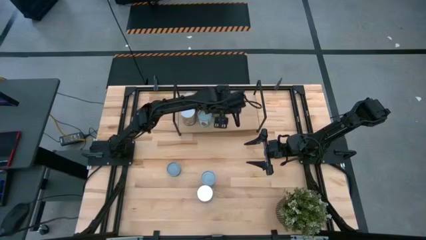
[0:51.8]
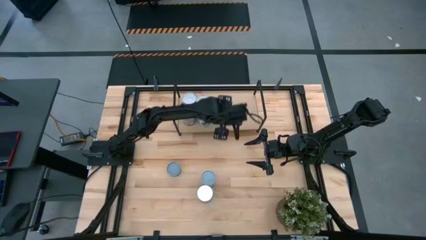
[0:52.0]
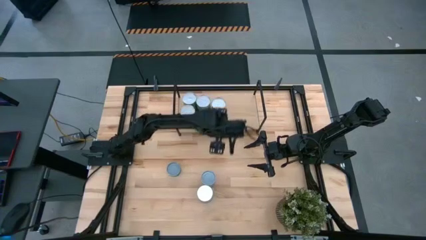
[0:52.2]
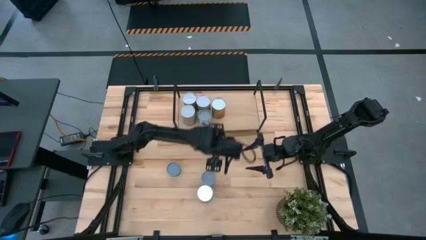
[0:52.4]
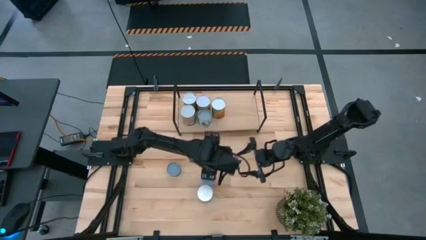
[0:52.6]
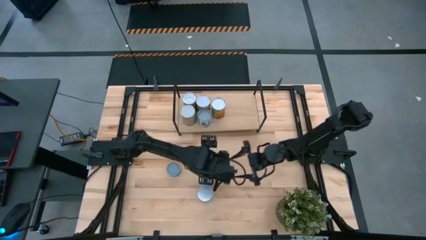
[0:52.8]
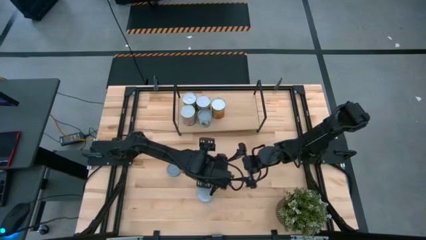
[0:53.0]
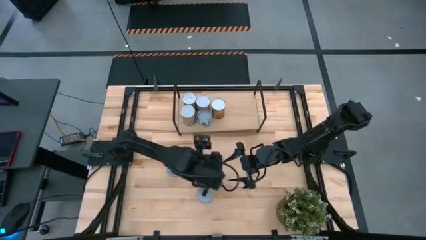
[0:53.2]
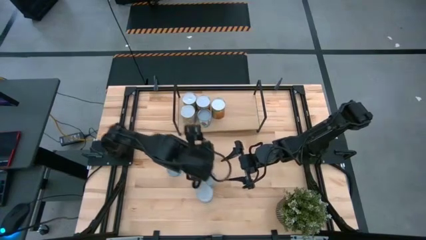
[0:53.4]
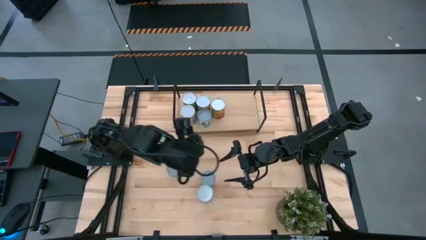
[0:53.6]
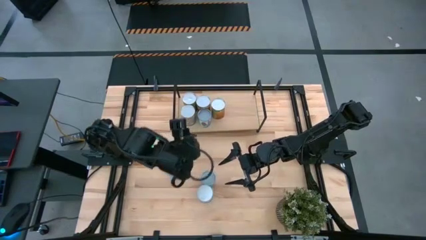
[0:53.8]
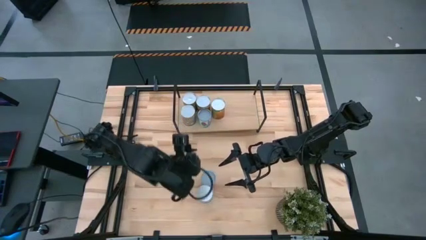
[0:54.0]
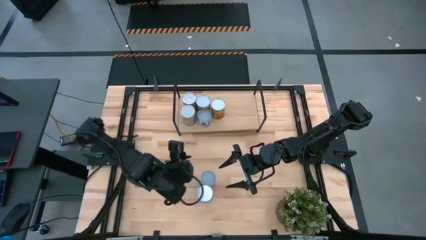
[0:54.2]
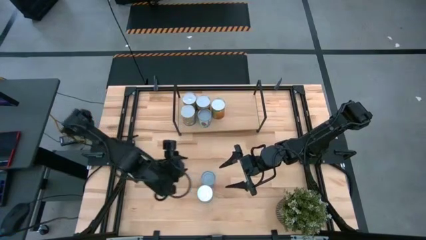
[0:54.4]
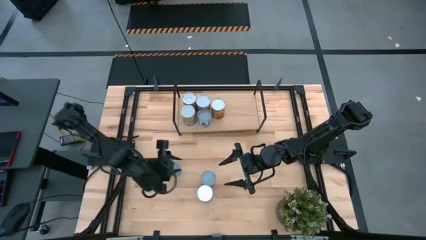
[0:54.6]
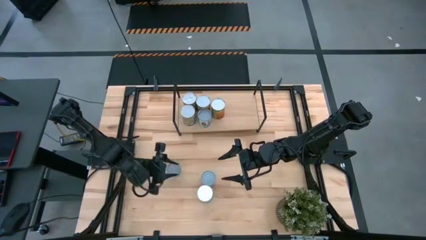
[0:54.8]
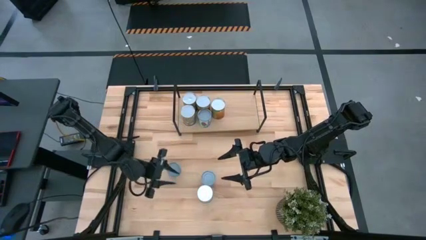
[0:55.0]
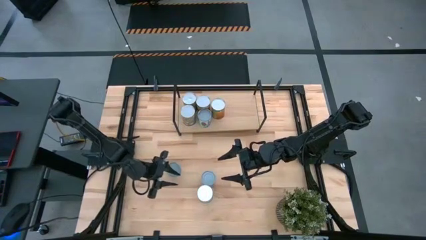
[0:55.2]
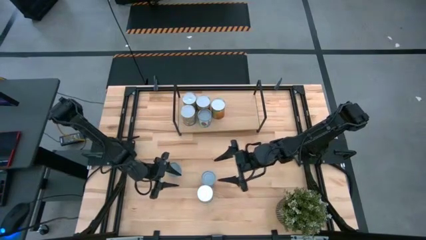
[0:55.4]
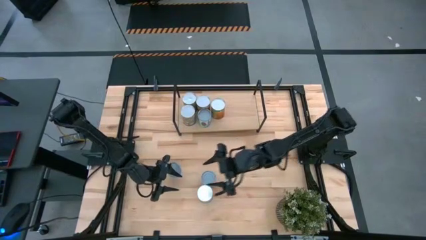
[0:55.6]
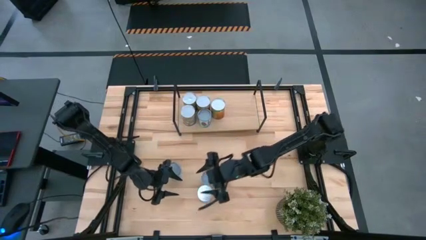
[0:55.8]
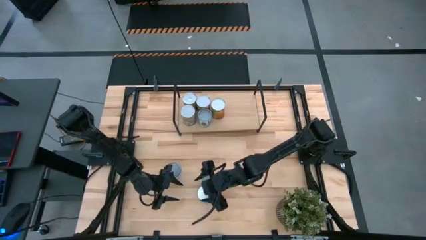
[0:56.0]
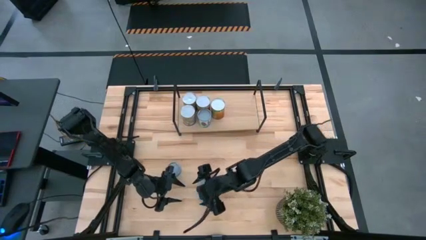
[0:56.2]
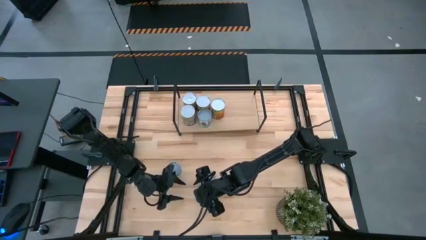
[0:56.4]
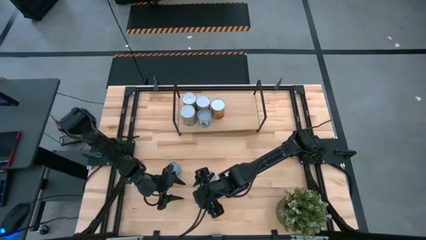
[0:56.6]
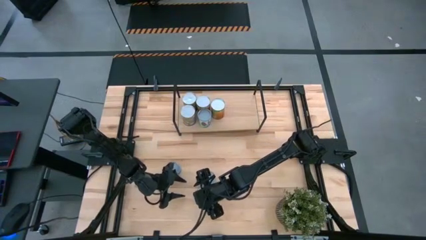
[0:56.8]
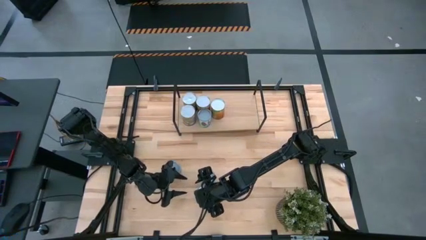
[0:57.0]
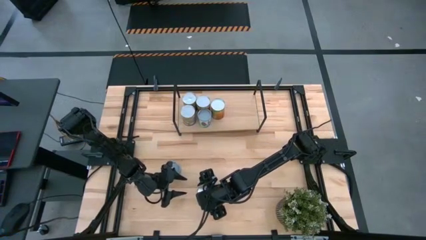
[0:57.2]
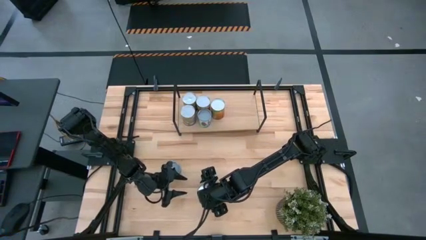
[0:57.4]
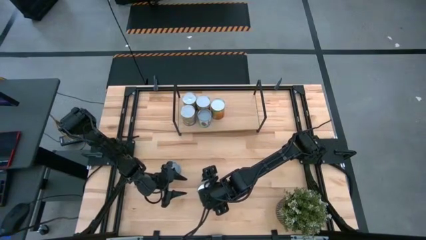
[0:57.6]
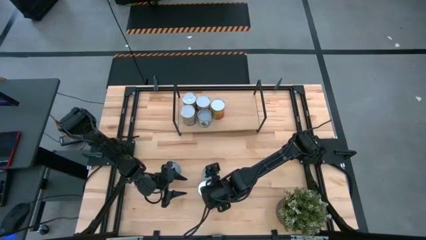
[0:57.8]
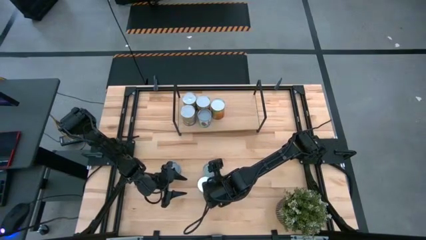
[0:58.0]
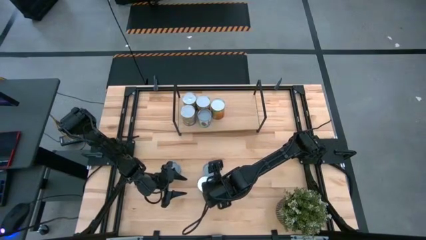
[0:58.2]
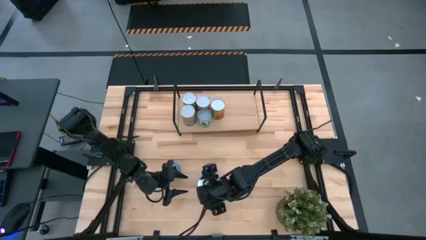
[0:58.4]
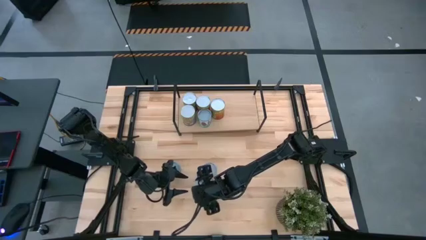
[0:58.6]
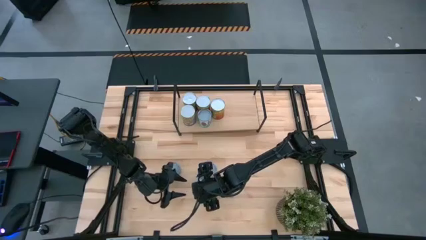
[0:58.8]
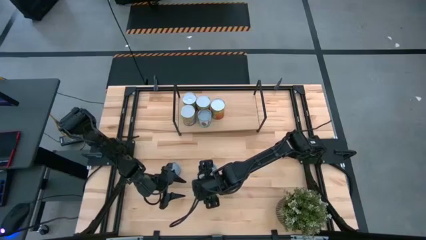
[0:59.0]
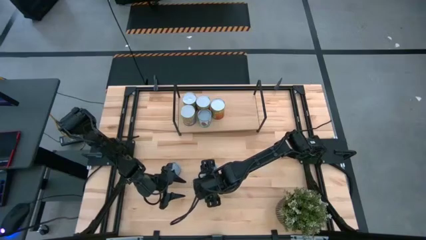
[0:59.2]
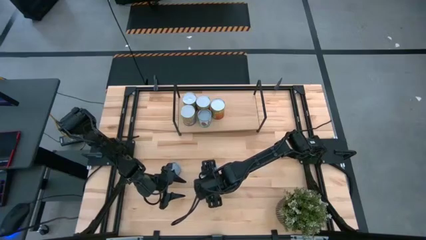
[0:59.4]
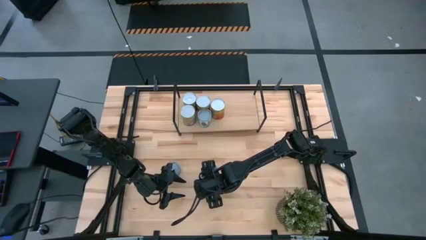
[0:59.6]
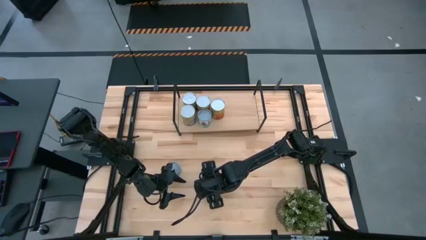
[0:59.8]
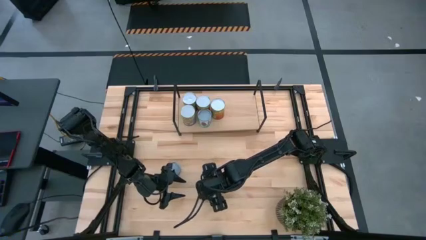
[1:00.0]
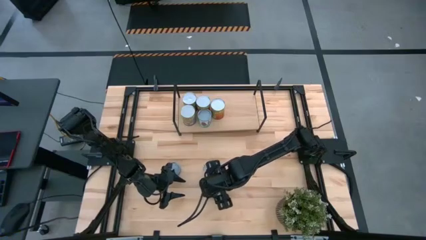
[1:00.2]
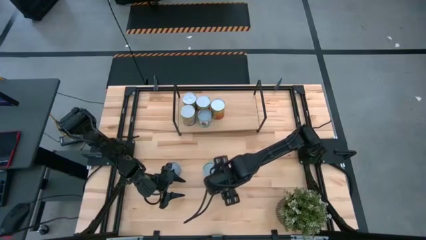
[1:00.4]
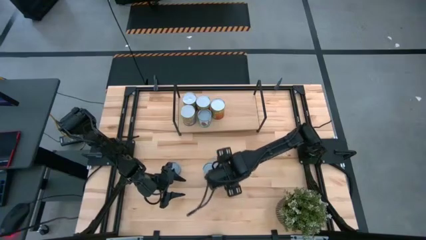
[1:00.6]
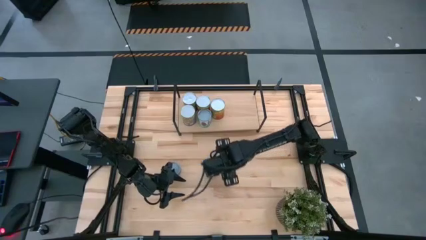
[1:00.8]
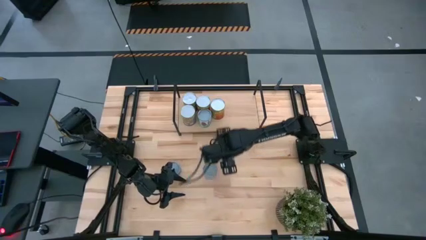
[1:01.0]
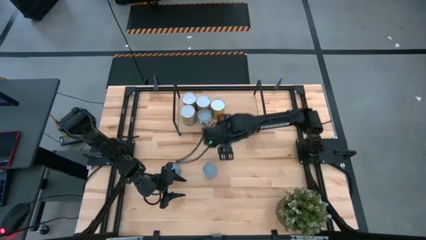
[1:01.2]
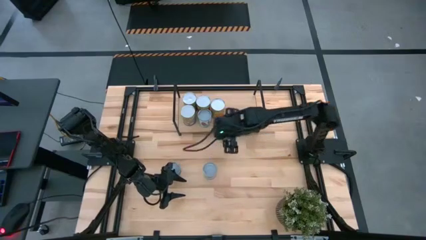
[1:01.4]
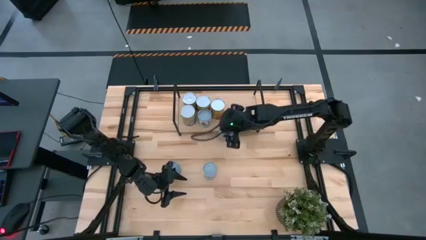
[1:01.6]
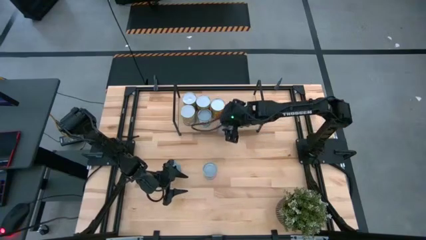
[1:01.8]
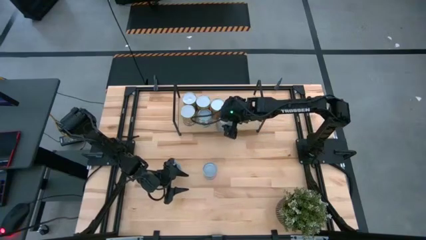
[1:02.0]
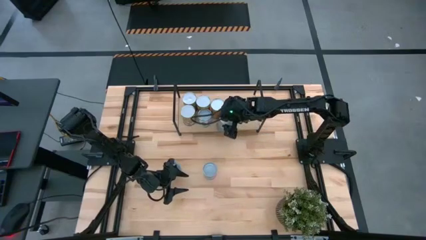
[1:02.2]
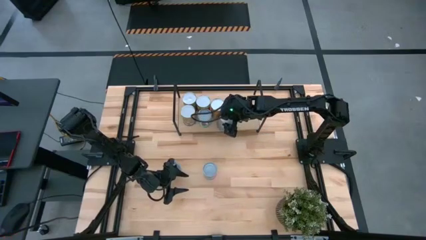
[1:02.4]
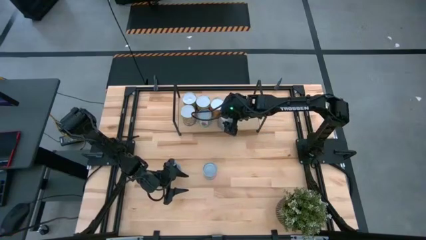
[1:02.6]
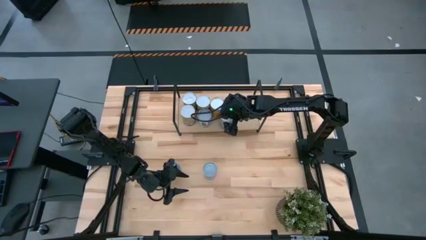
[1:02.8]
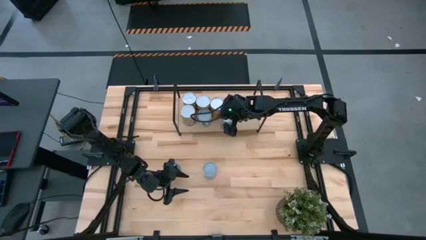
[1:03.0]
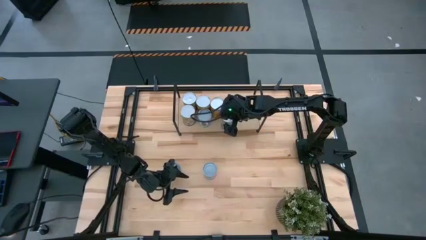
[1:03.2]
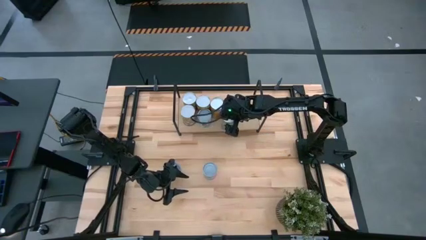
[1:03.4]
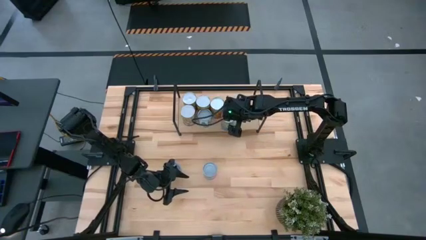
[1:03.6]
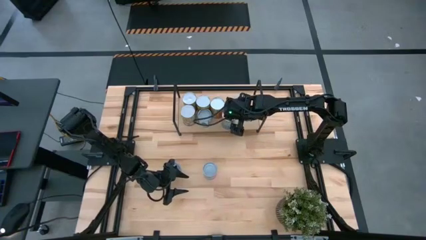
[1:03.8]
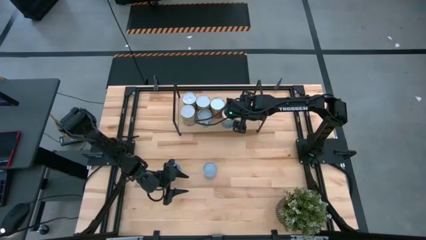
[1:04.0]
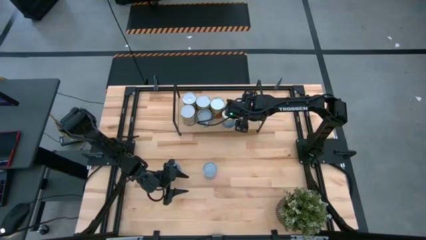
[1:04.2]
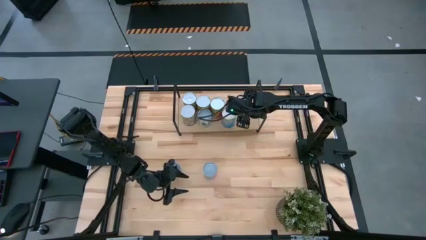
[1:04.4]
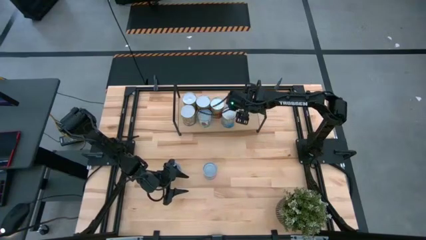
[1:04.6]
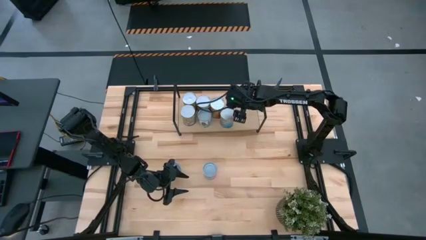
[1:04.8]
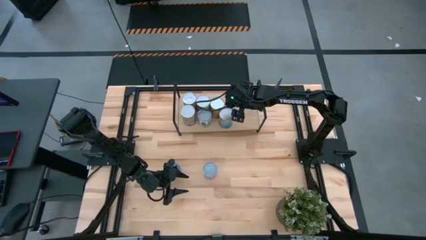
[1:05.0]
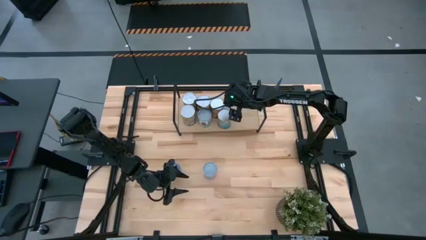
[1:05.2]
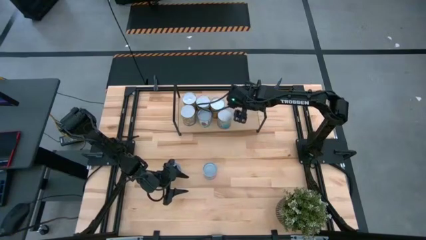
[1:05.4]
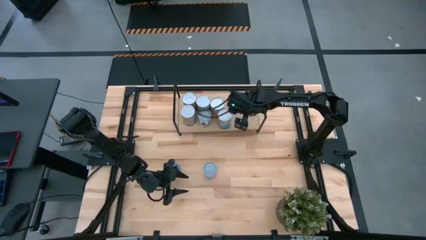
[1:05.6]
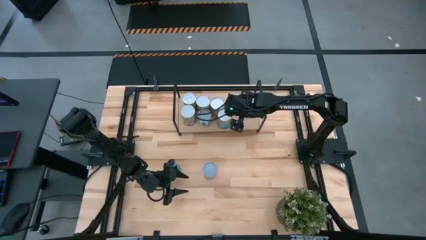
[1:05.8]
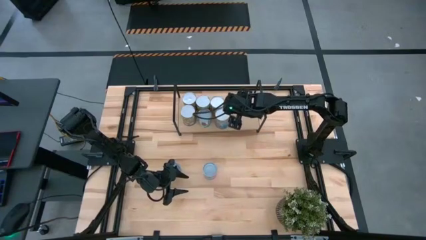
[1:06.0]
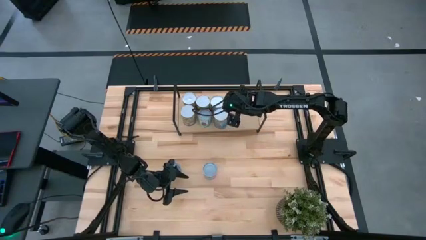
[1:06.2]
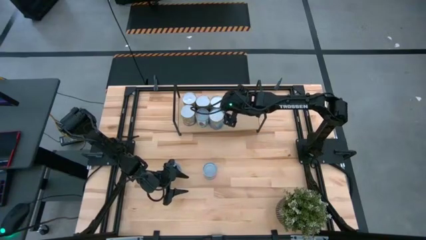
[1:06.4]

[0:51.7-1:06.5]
Task: Pick and place cans onto a shelf
Put the canned cherries on the shelf
